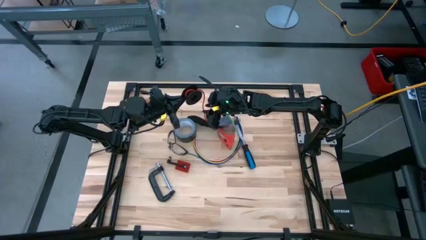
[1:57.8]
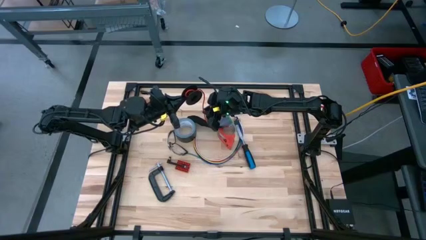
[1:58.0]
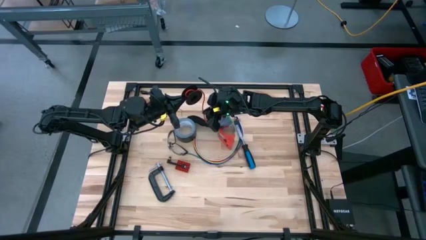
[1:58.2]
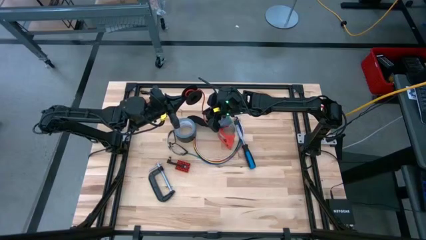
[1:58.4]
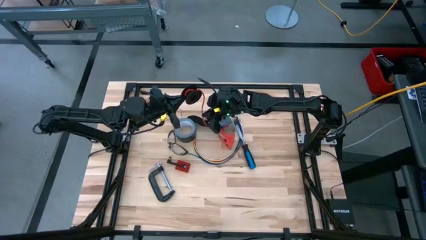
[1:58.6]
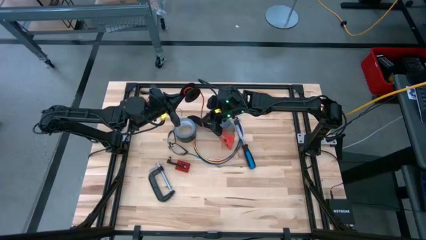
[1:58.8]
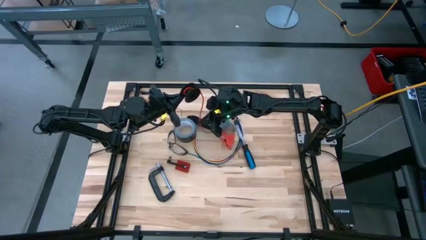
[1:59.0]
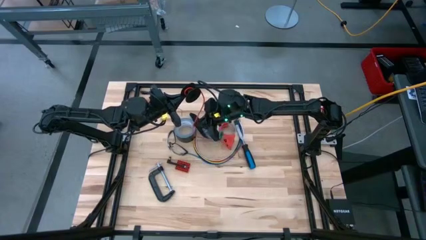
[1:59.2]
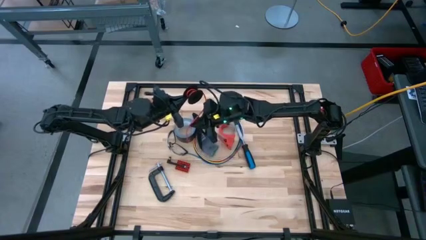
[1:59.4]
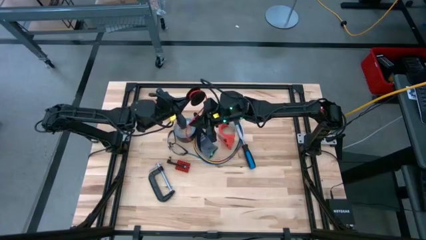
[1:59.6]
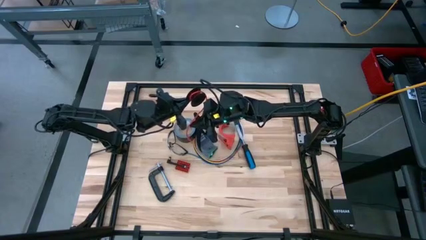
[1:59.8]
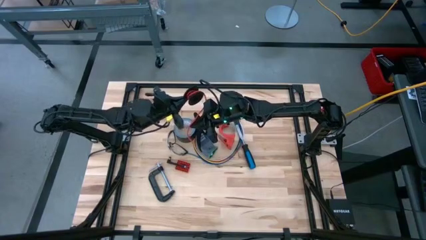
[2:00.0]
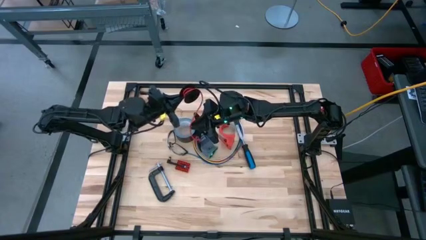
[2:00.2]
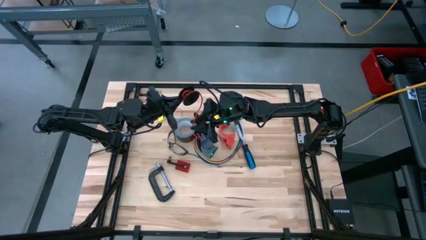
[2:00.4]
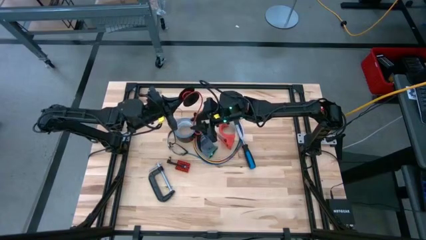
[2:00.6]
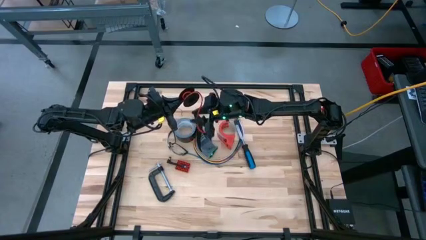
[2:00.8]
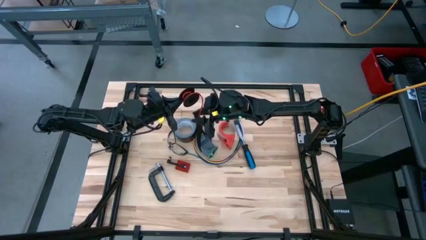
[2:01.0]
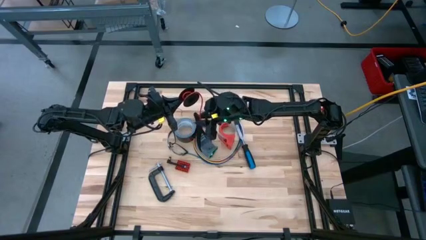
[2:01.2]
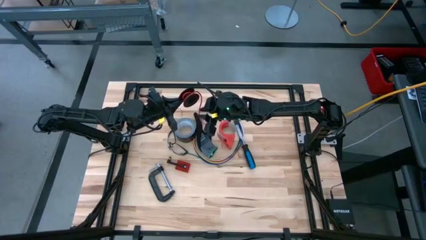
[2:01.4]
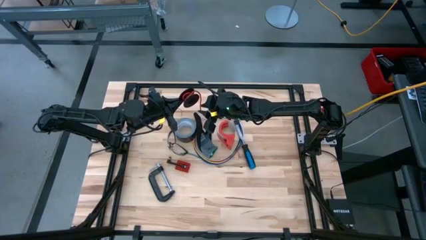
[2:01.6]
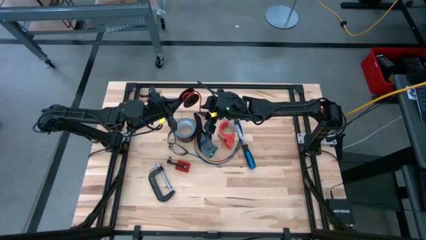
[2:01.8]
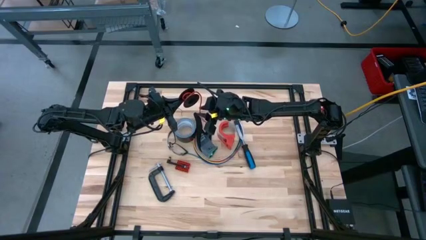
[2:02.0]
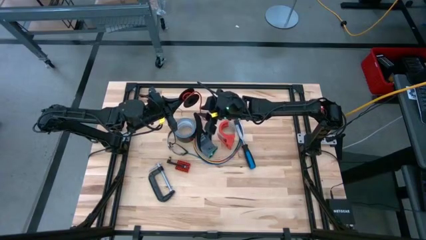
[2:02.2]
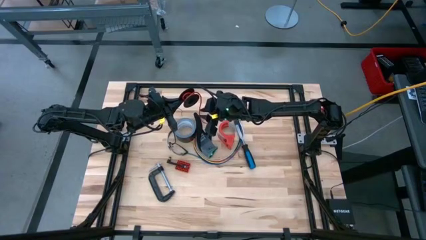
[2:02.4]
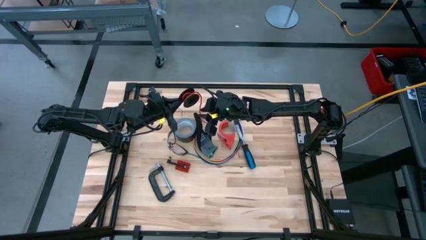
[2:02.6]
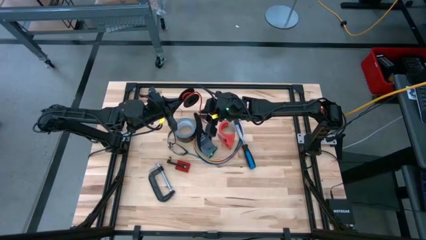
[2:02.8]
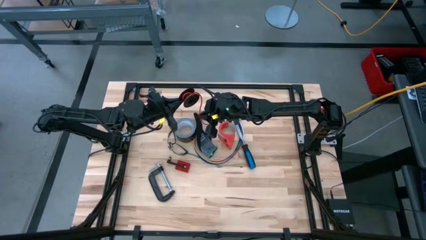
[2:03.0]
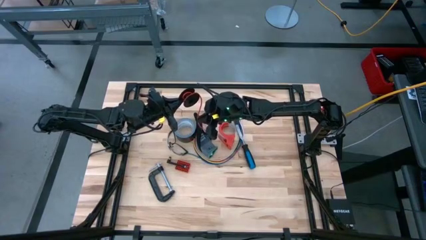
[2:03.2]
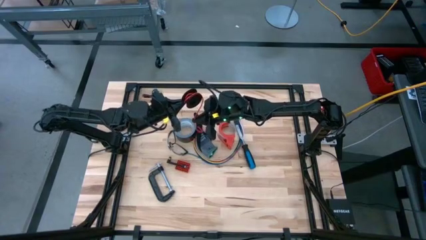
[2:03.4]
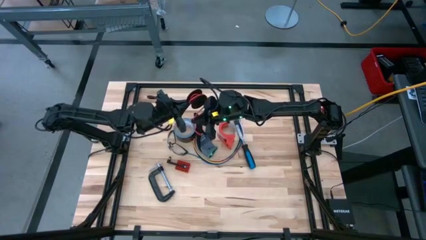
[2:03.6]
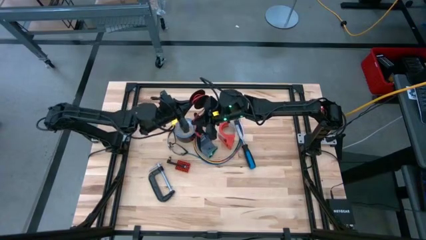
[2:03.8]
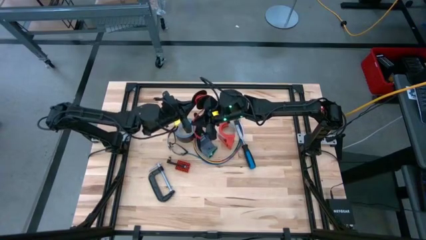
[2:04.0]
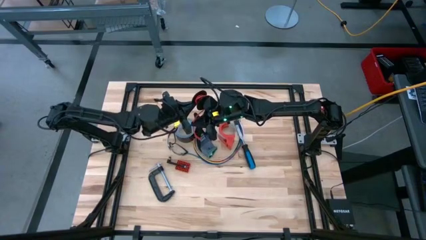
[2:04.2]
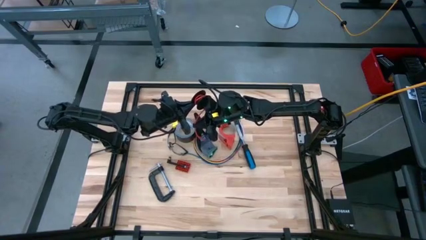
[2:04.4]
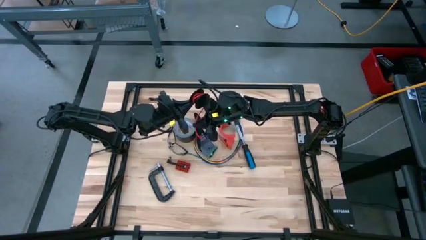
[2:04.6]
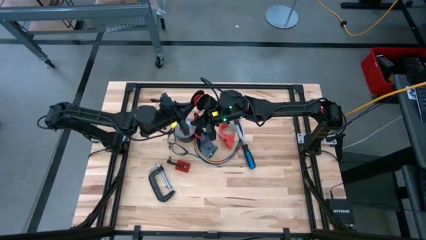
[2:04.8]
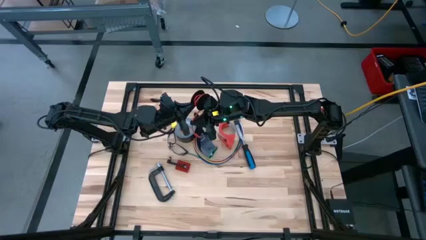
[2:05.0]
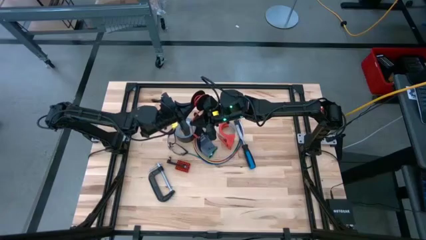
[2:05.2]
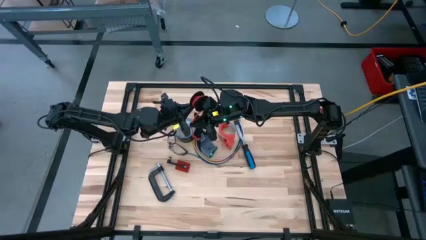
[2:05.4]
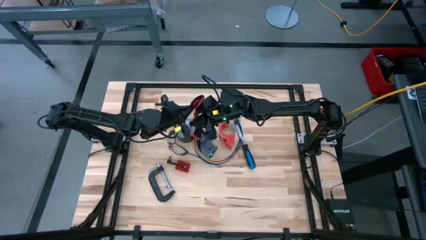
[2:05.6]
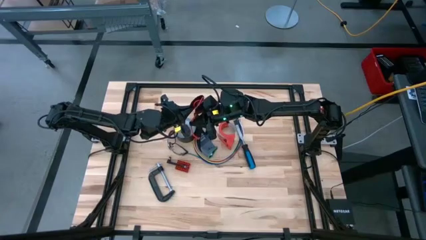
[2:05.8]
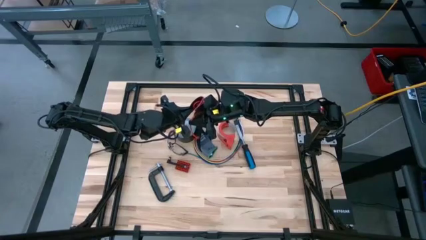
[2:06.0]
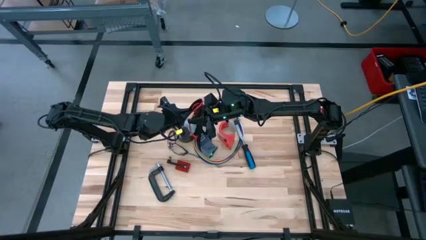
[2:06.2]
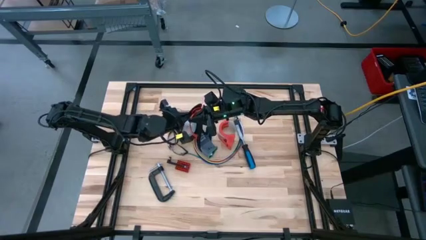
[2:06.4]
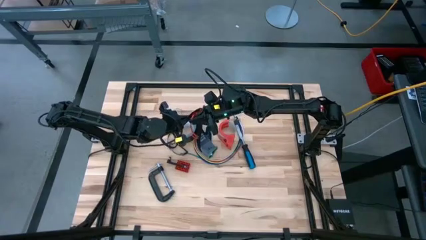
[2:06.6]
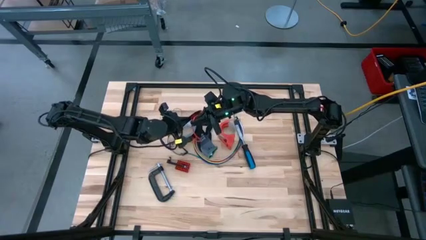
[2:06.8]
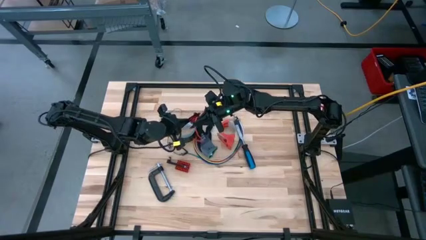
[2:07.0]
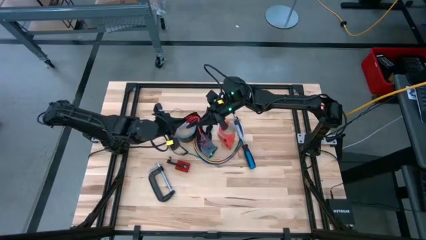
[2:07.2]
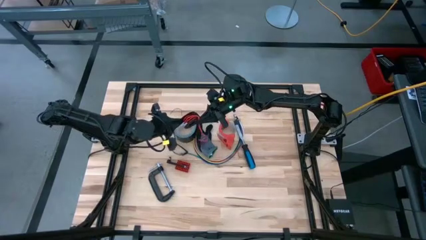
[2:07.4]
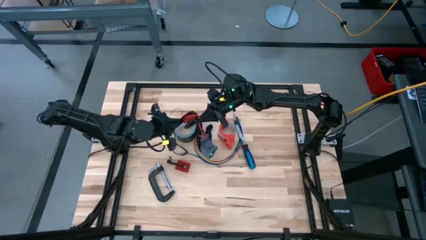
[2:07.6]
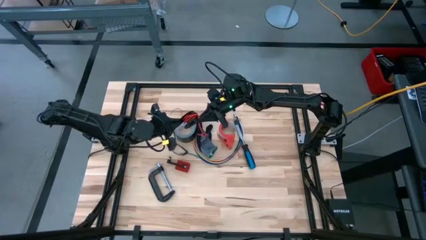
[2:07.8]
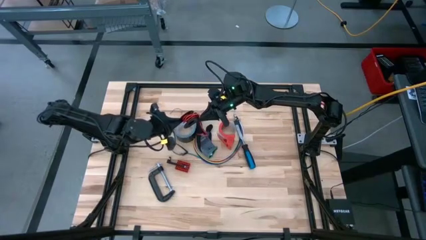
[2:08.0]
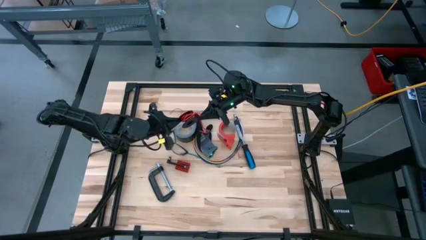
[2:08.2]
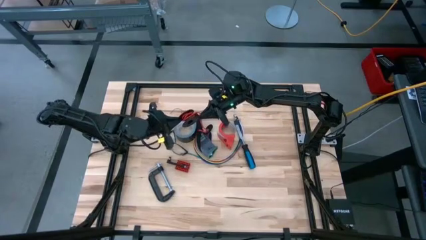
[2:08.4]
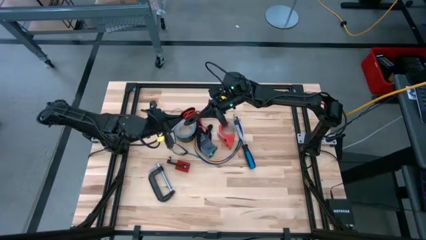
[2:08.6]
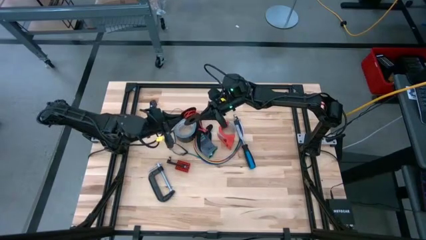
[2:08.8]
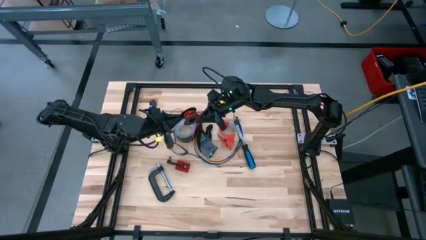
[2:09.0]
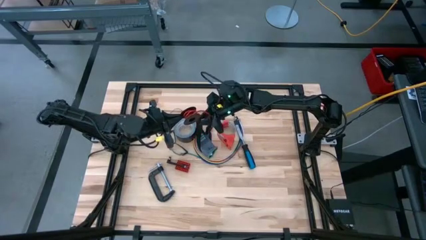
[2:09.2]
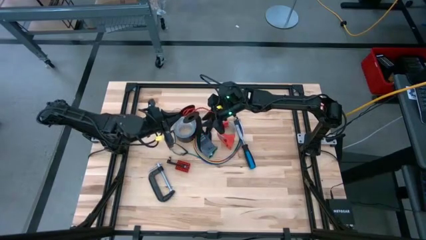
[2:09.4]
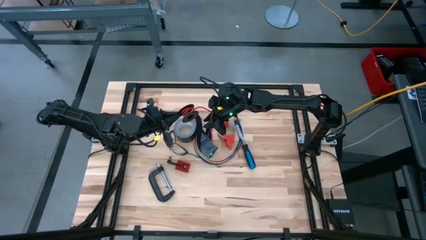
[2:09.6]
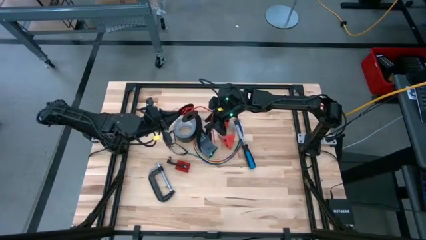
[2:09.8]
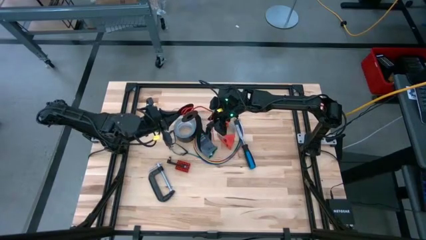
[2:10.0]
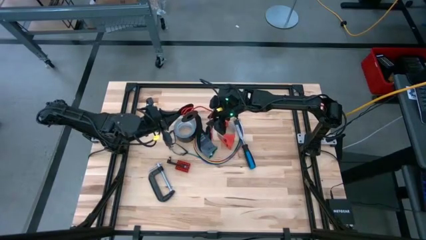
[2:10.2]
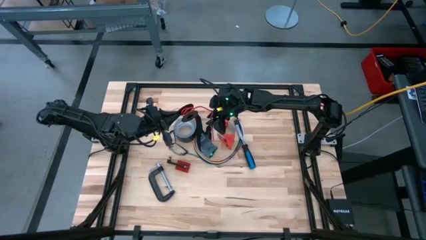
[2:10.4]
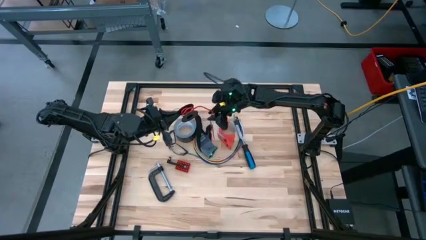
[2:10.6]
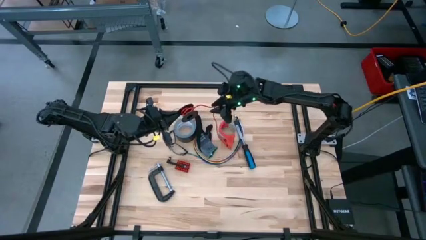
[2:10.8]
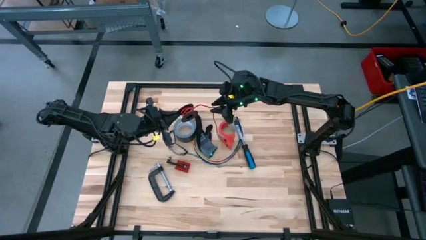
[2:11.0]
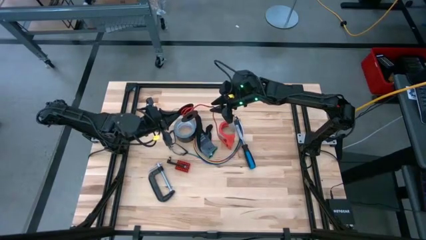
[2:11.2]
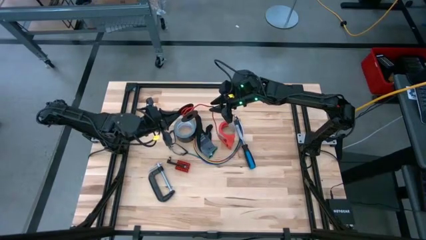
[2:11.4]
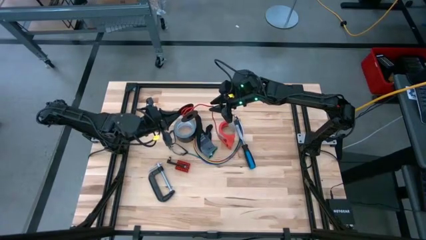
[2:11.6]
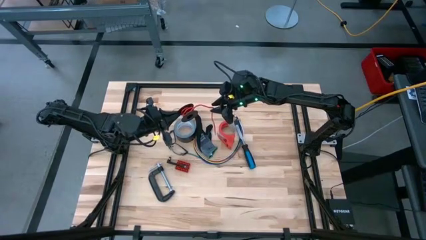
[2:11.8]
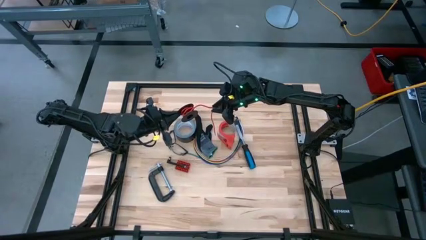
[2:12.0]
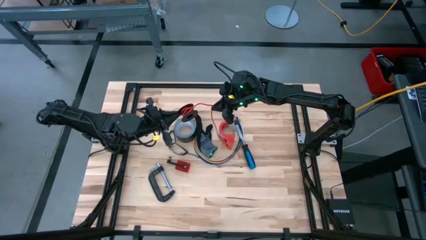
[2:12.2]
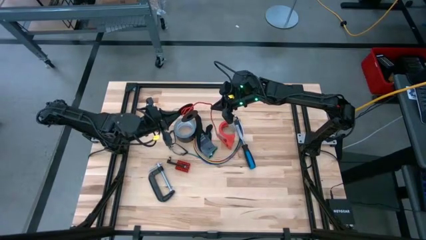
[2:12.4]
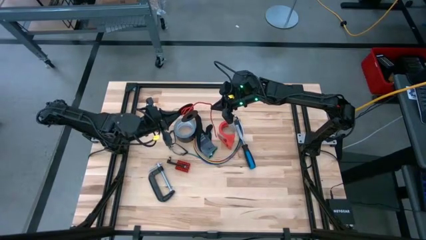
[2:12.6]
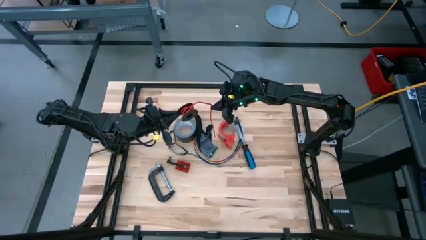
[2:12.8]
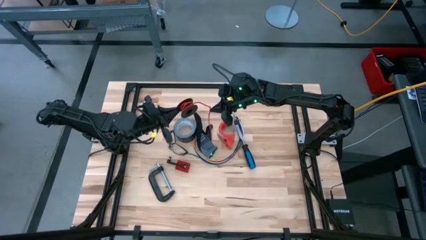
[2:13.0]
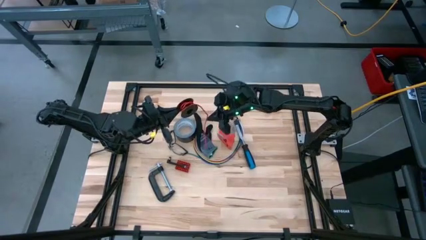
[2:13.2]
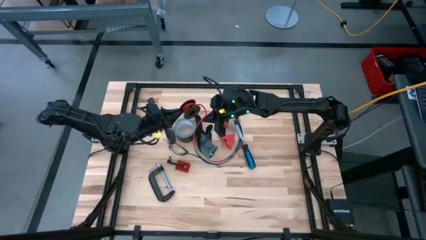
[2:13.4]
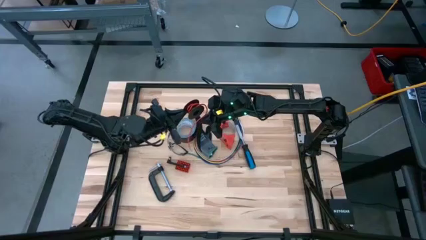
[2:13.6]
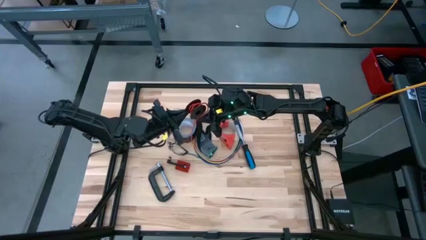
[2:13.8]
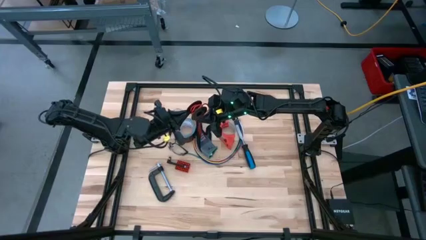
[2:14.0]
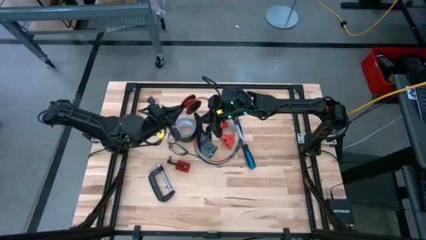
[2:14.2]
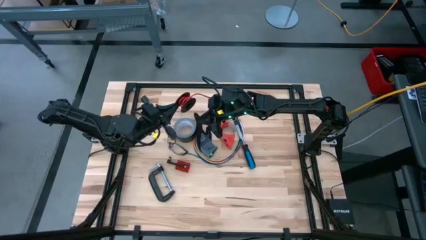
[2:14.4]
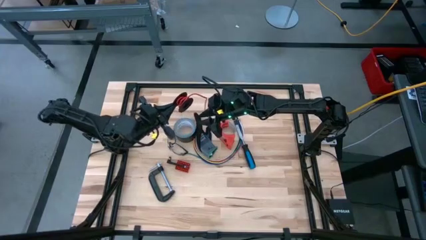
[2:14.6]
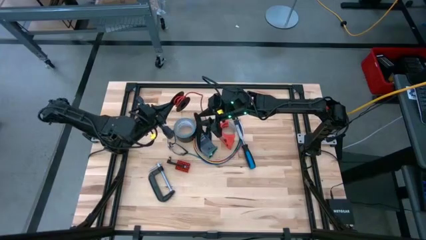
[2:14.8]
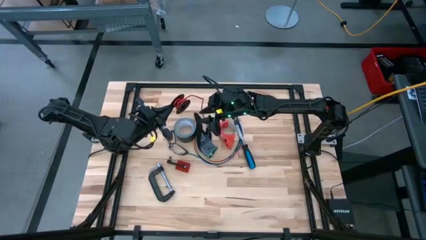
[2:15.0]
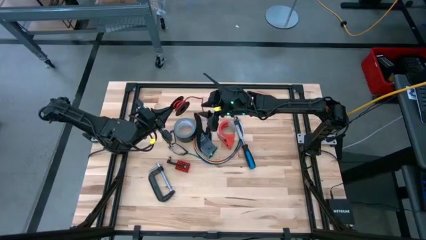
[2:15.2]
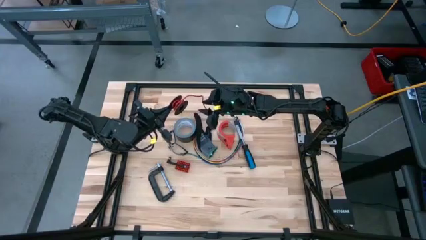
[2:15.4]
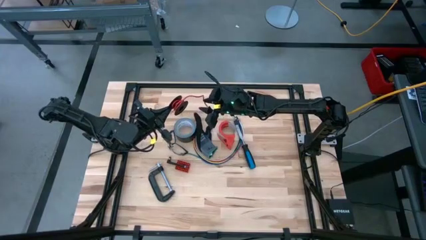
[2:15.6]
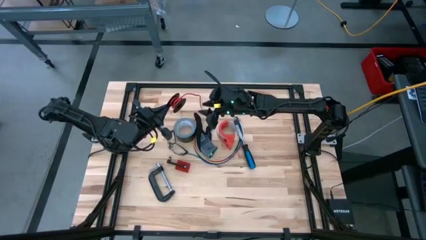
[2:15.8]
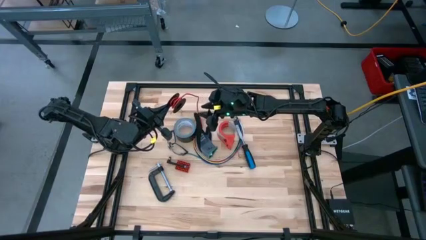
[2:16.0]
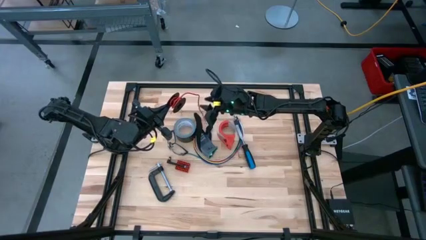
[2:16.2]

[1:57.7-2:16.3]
Task: Coil cords
Coil the red wire cable onto the black spool
